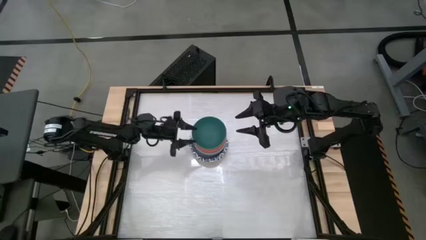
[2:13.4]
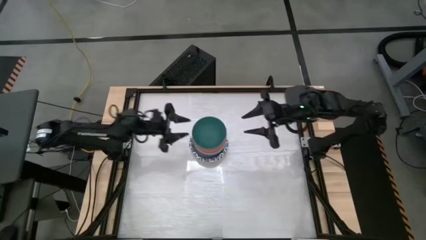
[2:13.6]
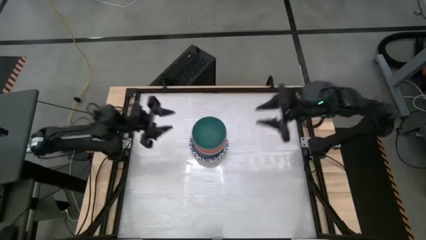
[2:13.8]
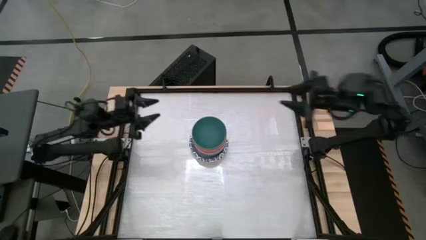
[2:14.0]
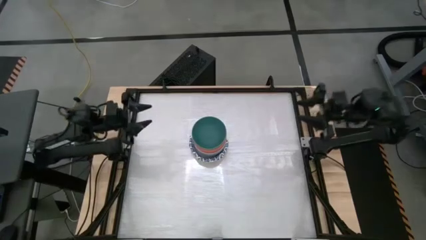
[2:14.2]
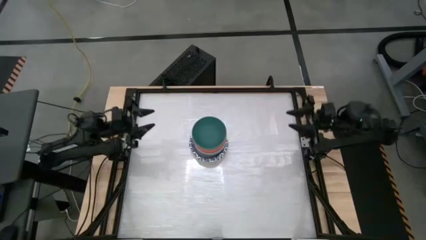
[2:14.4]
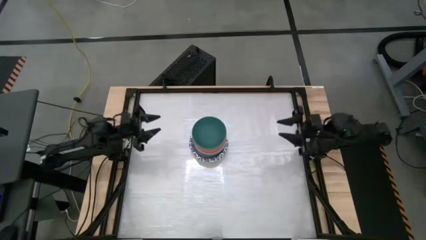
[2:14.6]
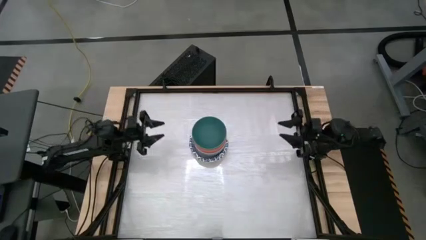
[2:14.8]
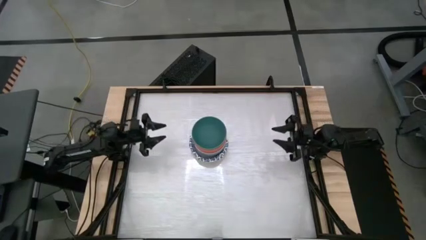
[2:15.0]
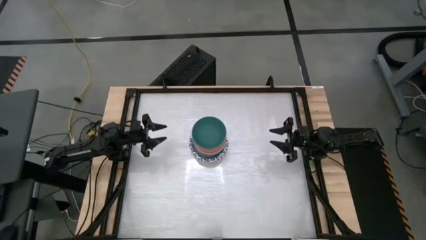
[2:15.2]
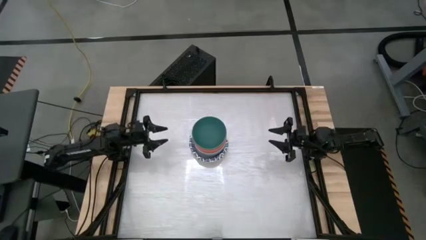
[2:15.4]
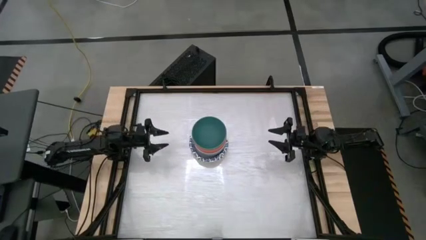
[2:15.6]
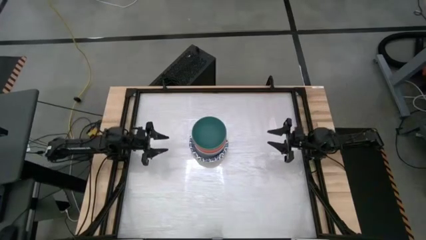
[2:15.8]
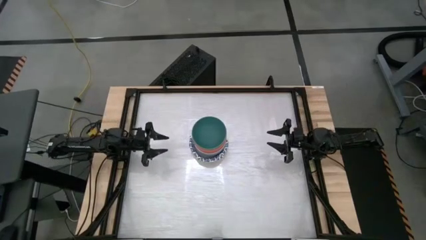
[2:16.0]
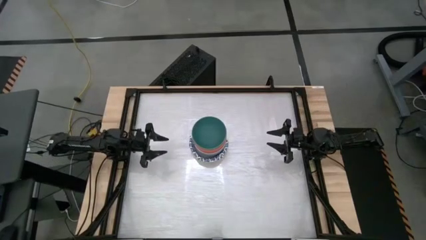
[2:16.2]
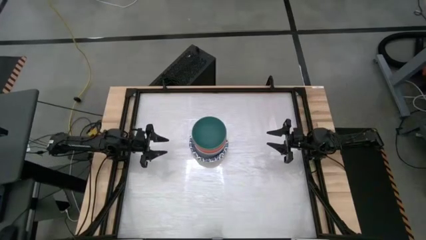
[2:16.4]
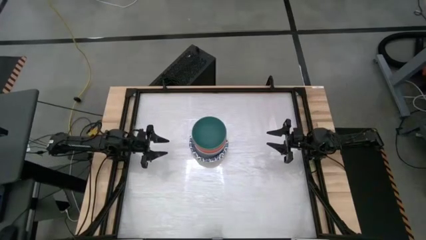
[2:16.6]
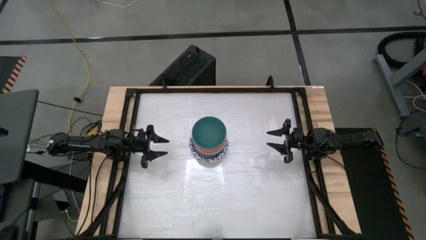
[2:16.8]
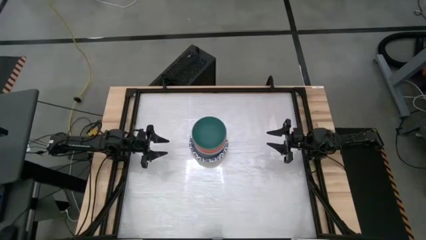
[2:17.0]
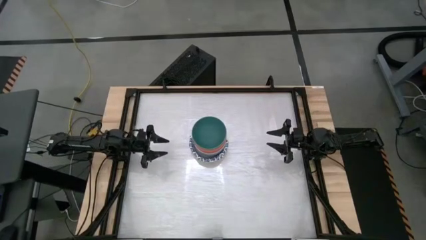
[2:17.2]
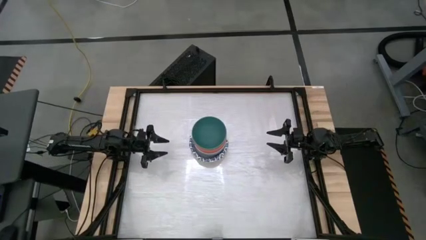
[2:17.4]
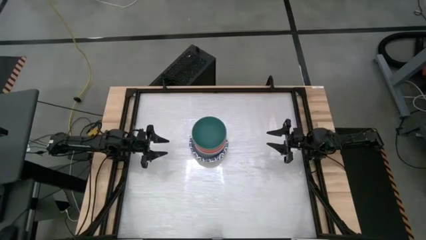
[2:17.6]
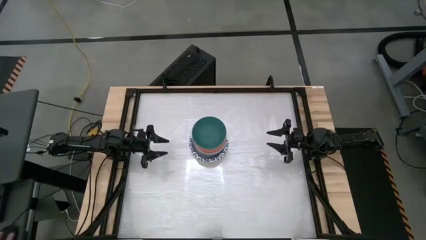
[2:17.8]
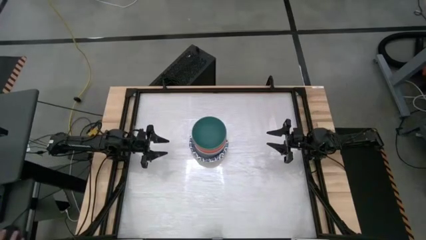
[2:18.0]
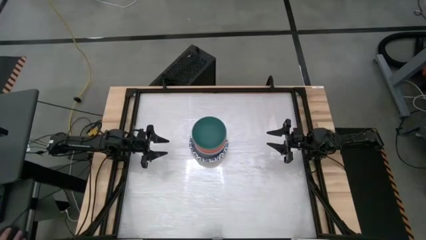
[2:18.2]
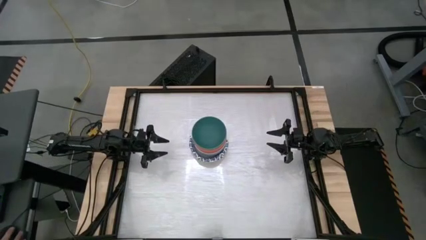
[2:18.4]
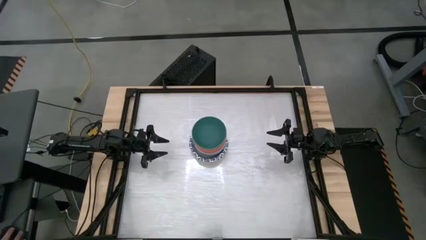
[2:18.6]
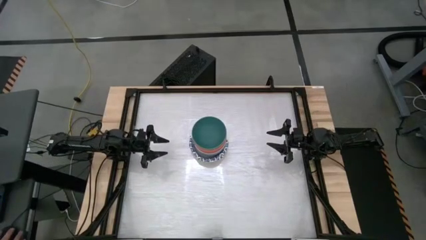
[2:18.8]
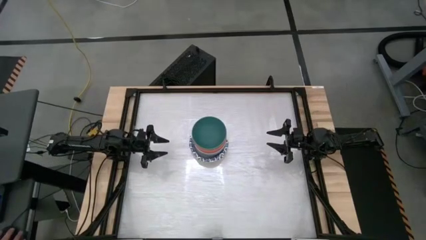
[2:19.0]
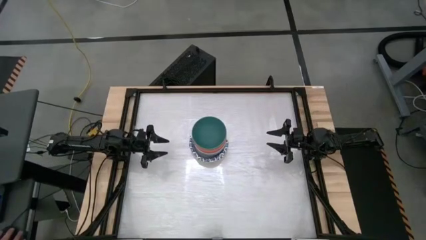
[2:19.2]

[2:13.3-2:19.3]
Return to Home Position

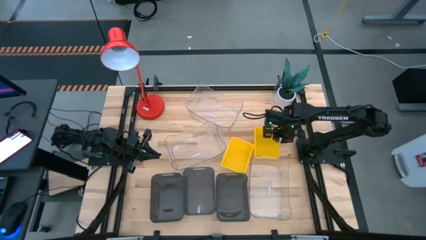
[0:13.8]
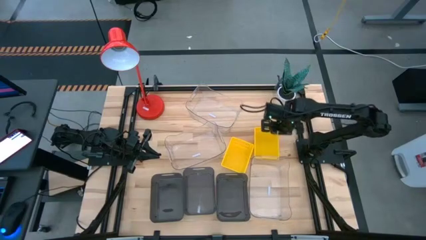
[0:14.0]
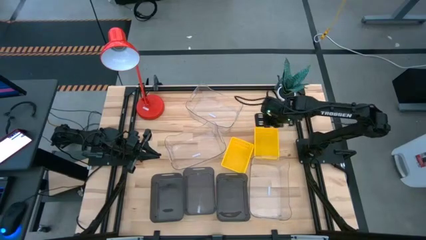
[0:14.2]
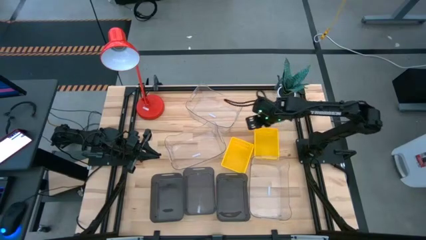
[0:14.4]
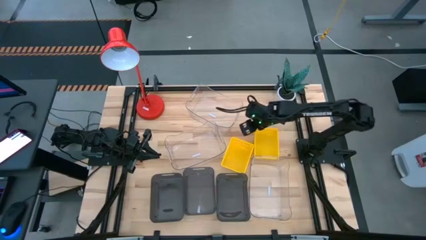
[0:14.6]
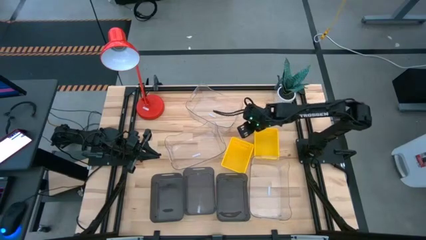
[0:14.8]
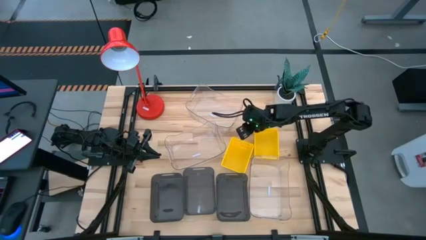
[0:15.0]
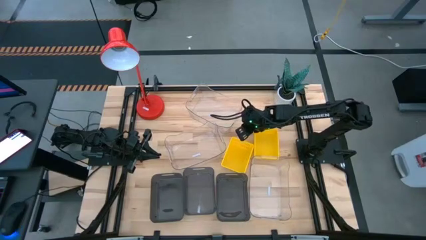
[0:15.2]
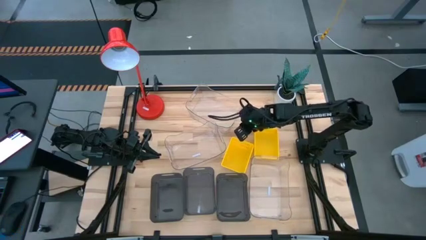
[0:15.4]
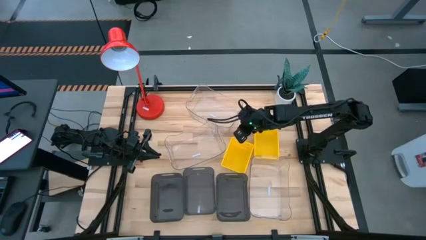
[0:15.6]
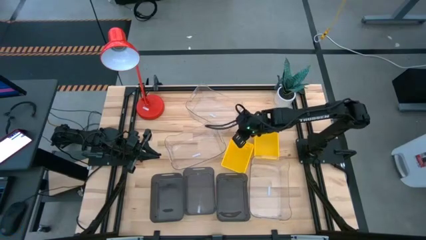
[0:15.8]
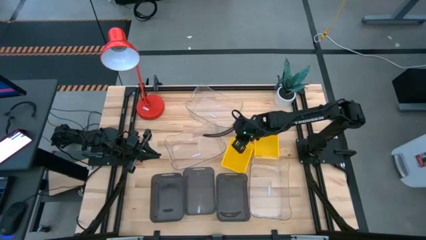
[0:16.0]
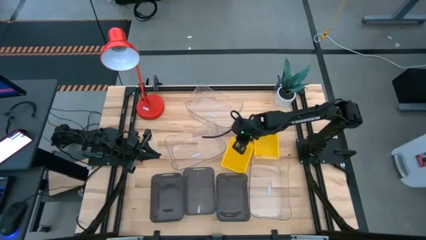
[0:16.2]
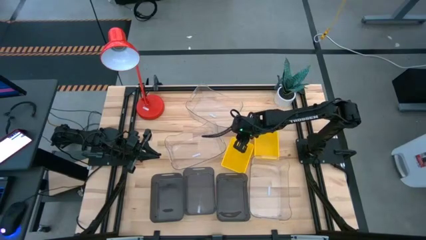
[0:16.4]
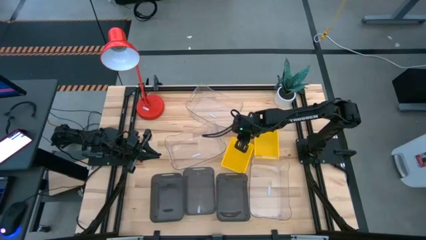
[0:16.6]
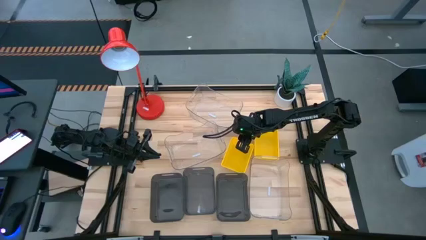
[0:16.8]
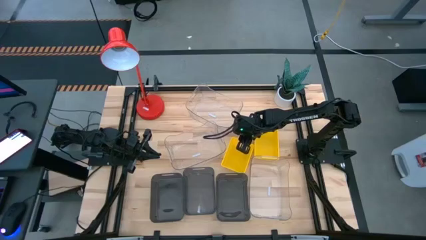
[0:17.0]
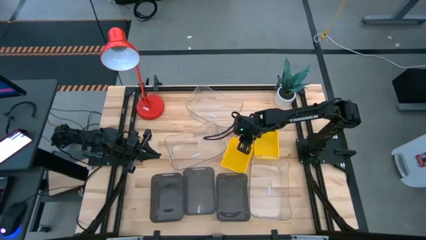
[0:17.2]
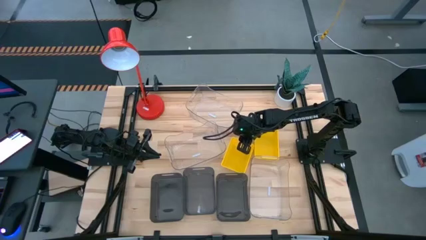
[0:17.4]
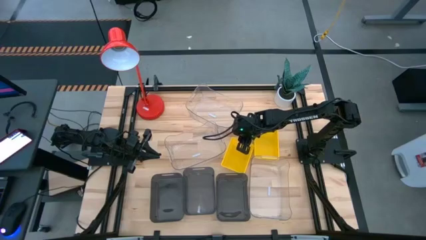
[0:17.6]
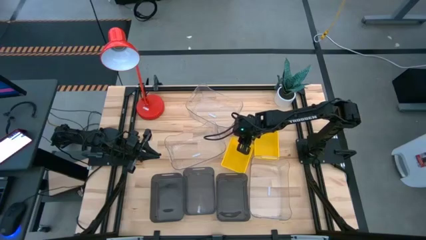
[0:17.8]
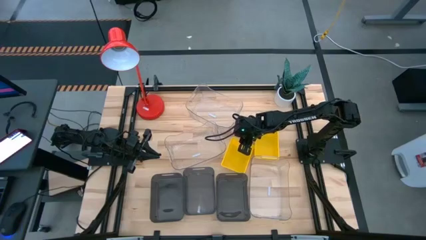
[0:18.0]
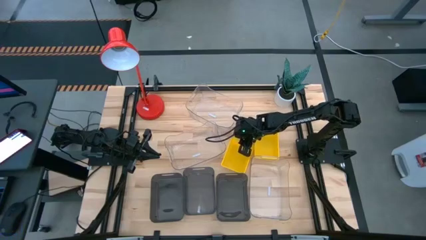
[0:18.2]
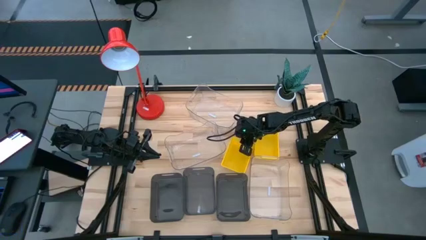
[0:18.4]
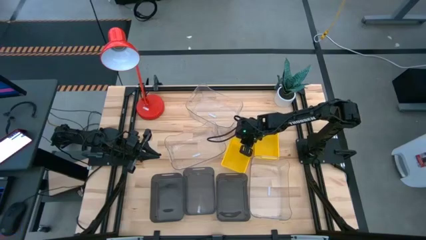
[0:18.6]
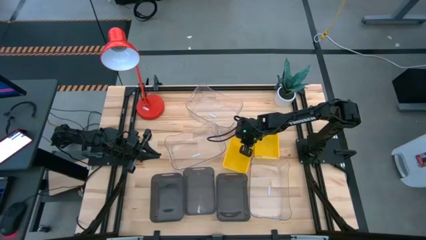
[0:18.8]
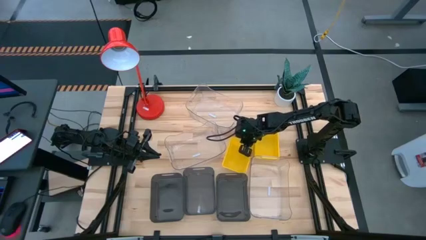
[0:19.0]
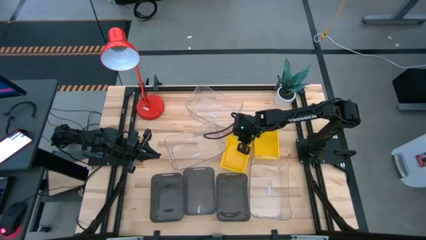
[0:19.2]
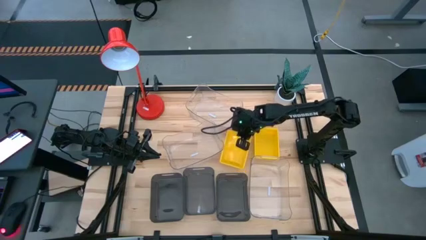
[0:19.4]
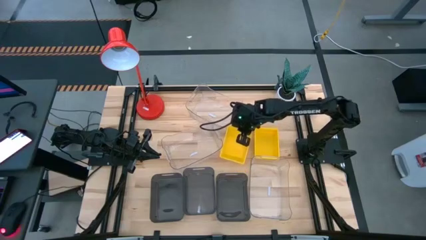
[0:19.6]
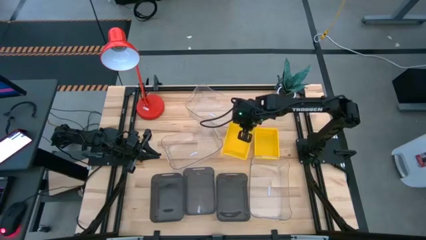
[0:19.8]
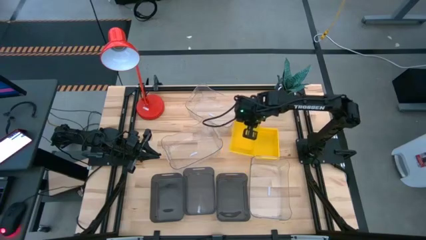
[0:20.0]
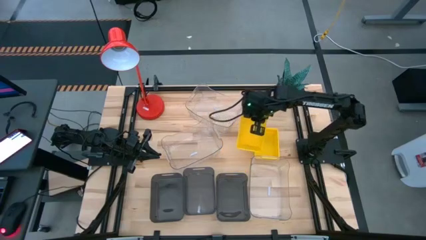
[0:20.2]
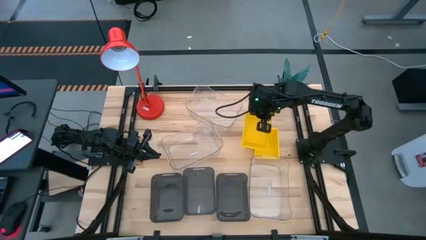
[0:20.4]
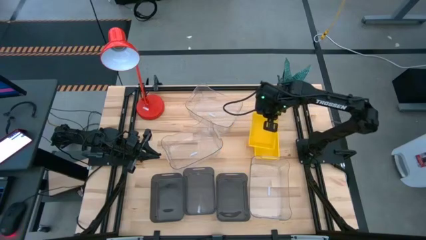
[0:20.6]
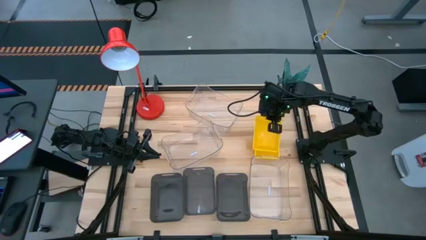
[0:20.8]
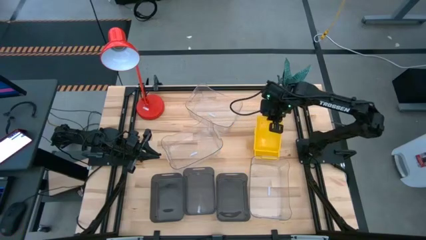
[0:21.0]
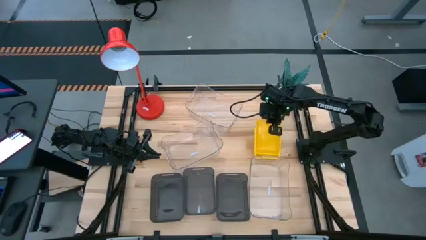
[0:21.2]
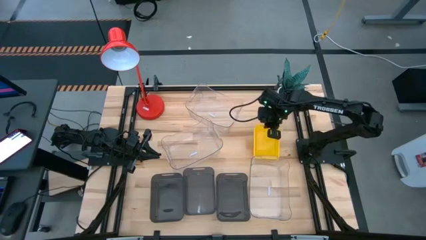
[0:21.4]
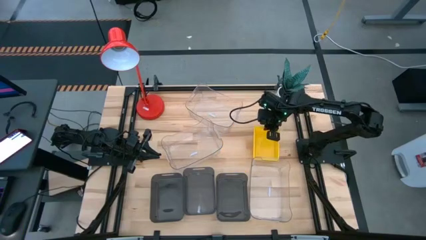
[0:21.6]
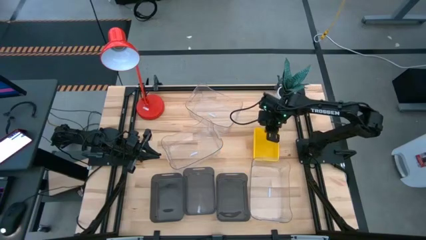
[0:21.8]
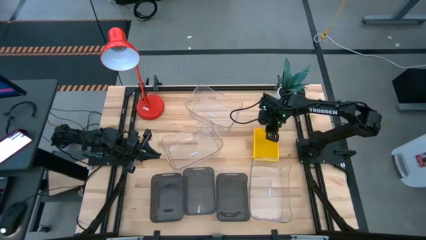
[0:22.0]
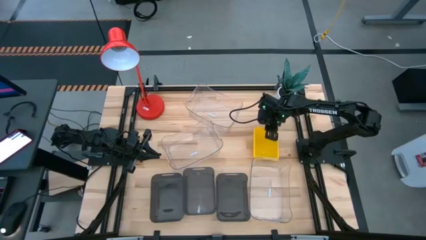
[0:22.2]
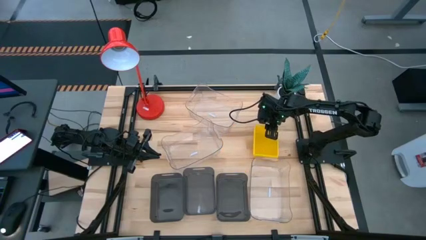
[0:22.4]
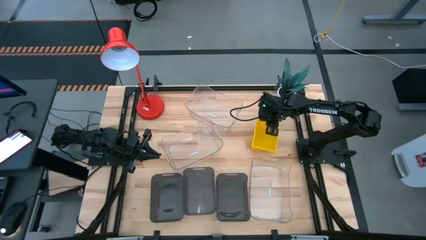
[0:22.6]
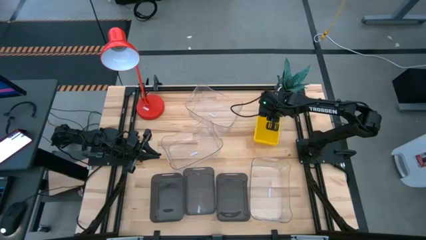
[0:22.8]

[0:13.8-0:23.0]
Stack the left yellow bin on the right stacked yellow bins
